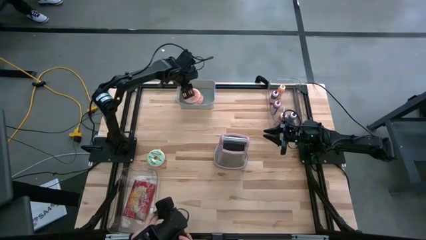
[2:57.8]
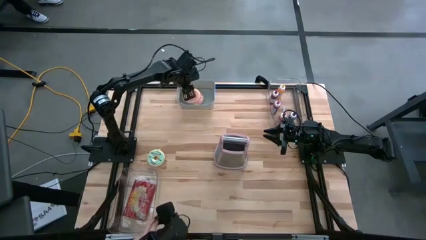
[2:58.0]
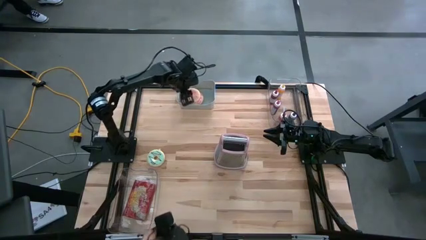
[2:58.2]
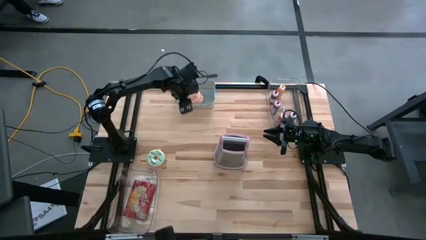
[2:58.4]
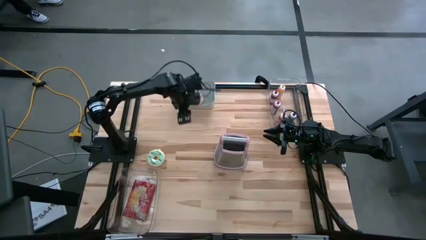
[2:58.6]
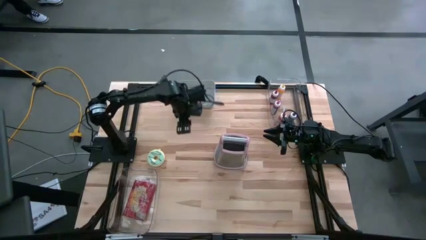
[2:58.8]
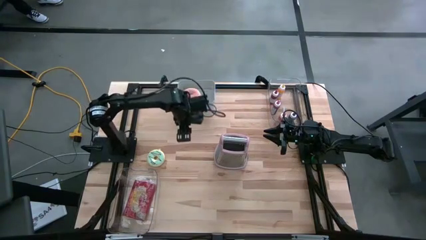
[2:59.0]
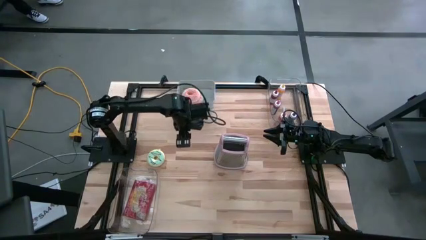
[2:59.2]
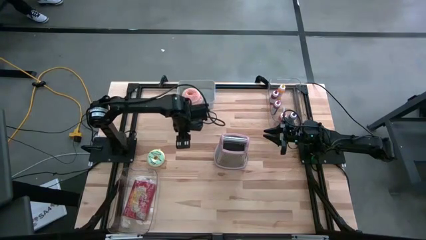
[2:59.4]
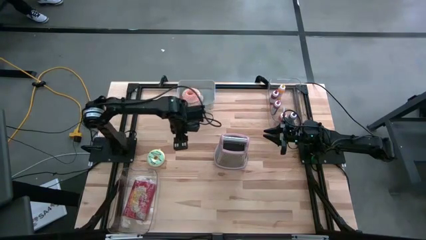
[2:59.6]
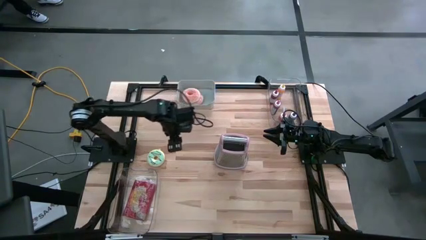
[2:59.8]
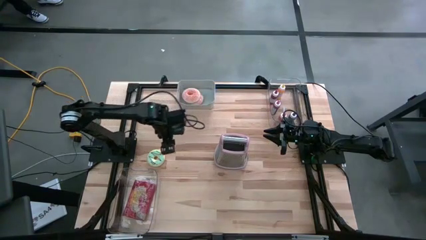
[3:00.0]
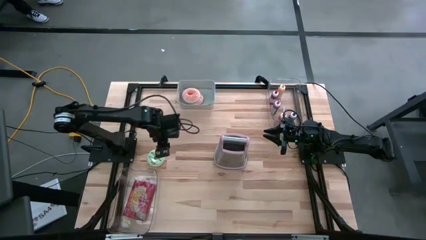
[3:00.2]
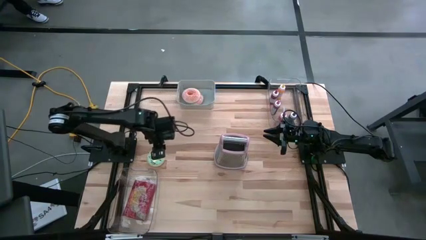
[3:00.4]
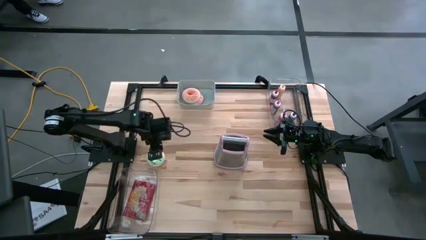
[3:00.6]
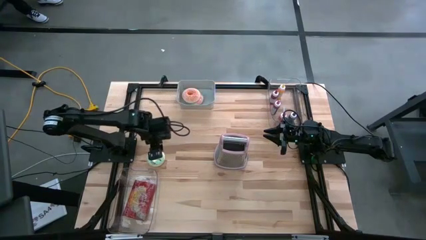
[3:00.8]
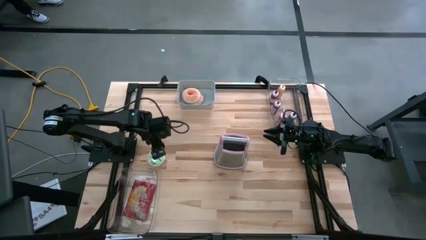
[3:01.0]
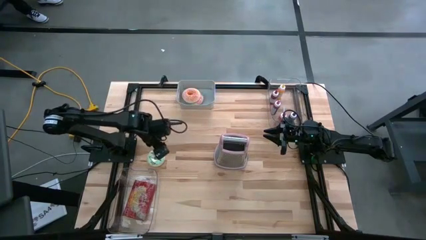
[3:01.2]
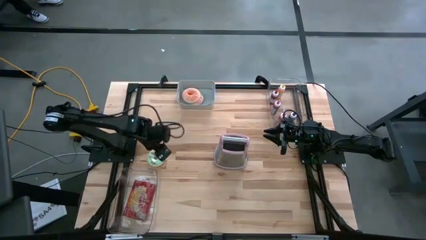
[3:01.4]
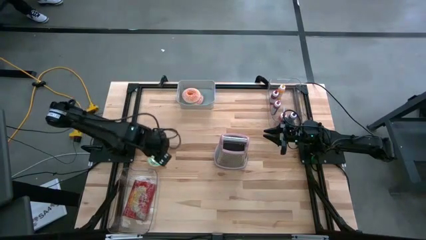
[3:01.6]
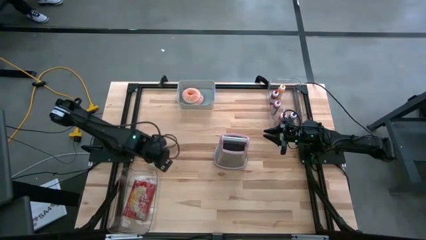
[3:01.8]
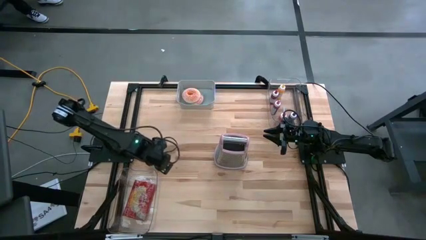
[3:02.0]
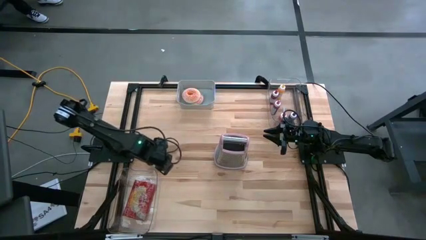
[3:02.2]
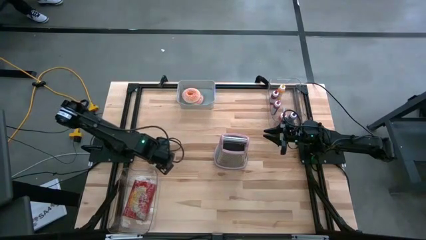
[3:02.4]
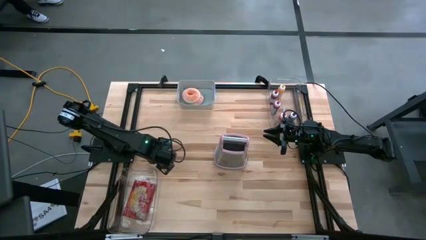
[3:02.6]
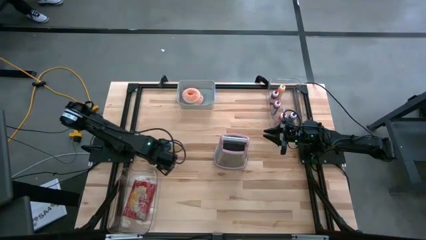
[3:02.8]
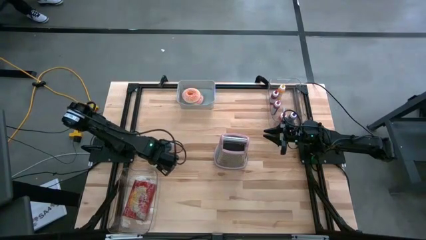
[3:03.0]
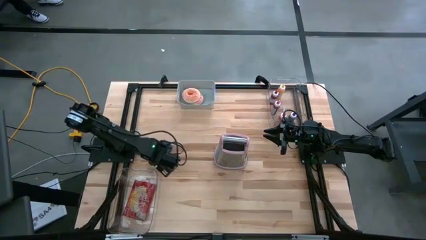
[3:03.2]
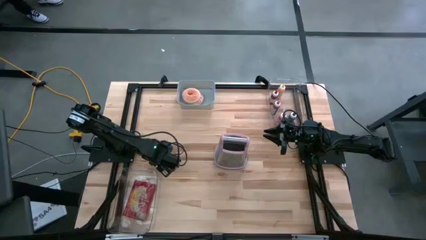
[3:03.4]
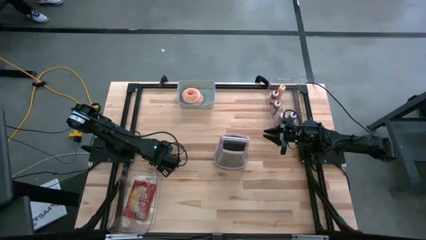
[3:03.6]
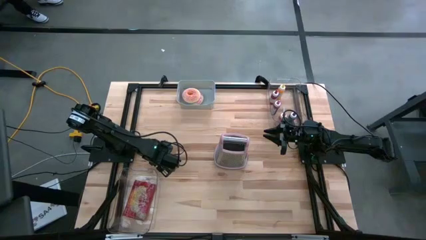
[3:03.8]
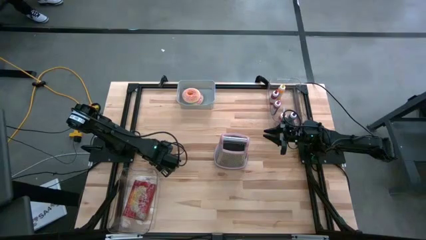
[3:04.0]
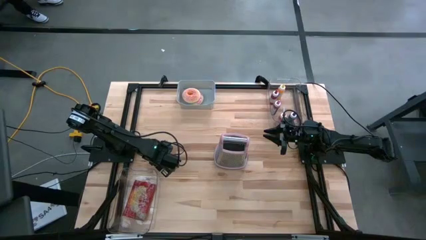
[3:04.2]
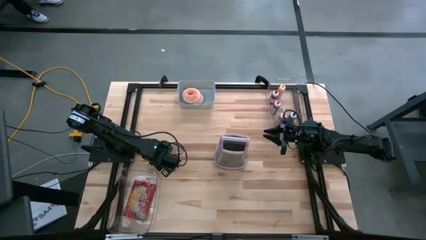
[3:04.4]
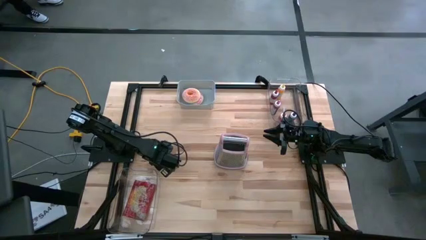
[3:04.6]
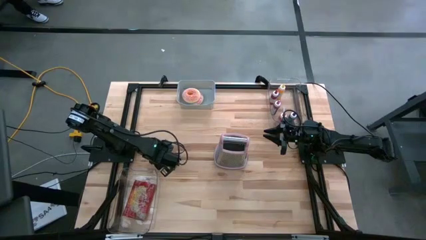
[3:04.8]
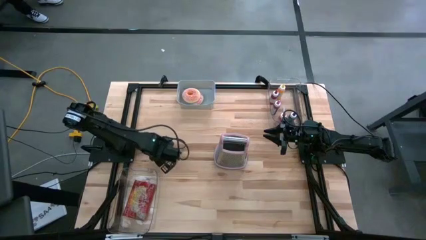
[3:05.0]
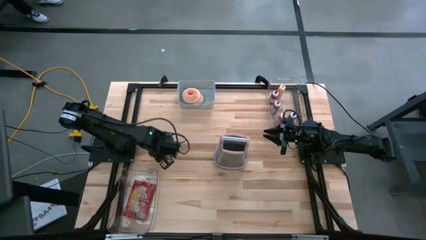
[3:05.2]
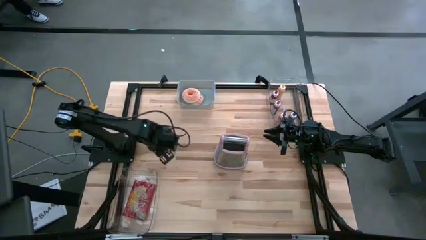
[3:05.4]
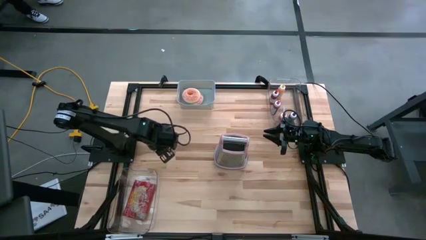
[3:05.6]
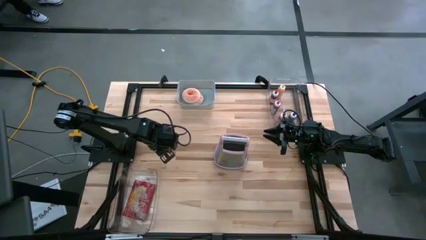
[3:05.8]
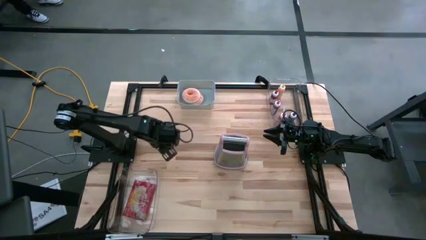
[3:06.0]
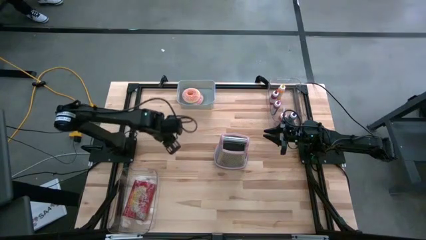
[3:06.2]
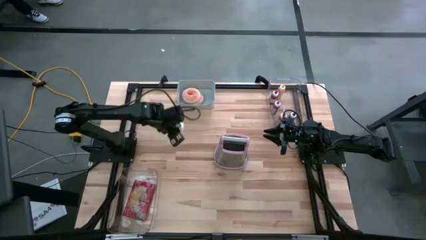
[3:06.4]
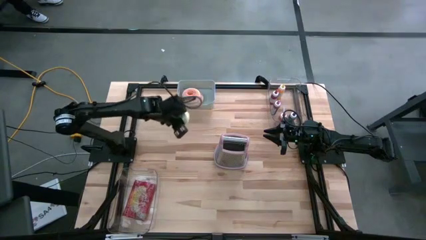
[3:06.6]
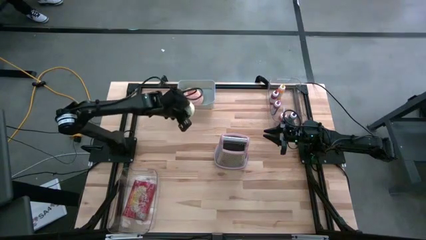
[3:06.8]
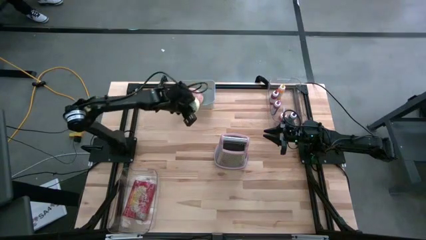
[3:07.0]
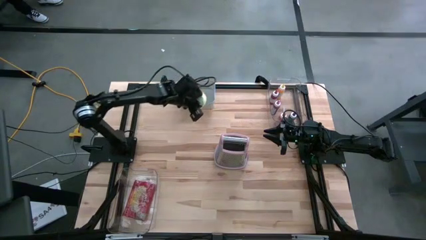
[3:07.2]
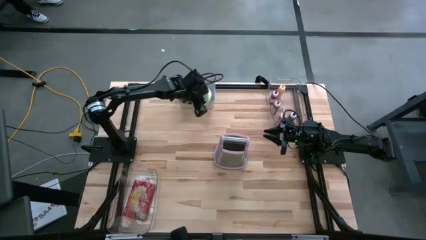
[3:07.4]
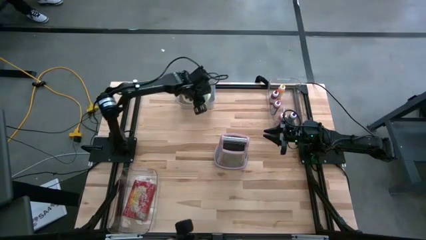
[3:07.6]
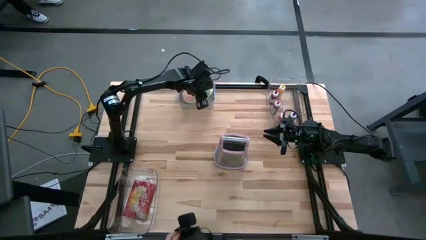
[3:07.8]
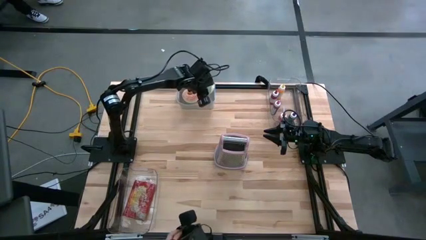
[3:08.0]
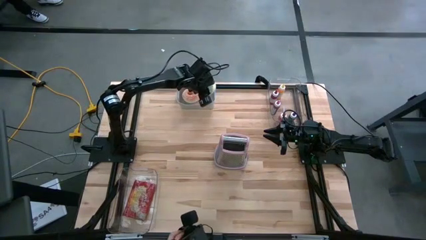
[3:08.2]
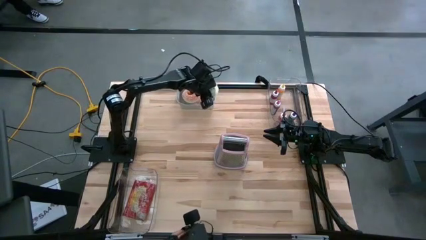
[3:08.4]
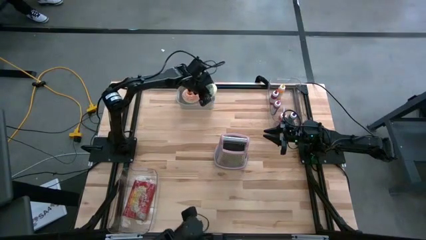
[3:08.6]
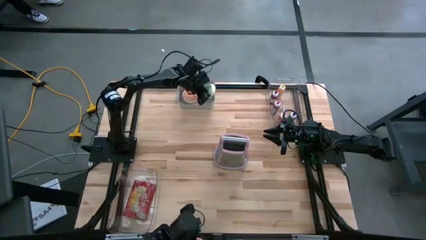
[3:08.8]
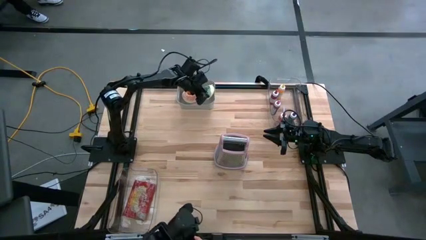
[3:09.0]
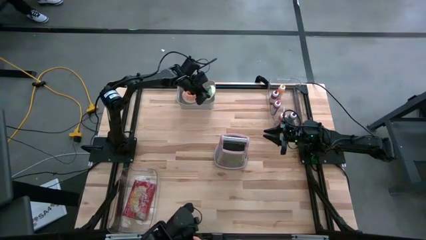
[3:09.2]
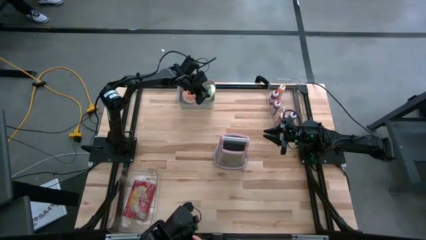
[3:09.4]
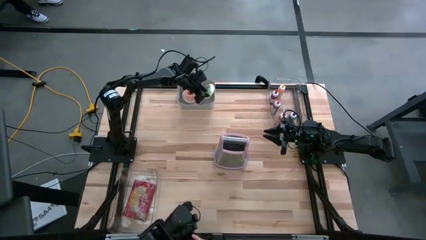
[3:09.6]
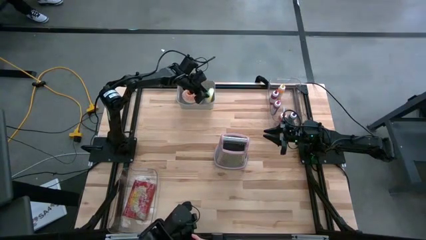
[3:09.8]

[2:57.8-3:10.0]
Put the light blue donut into the gray bin
